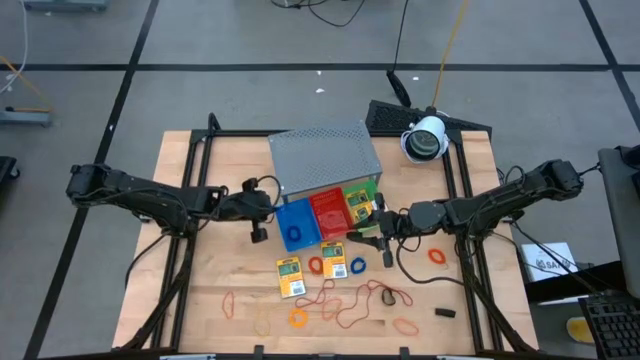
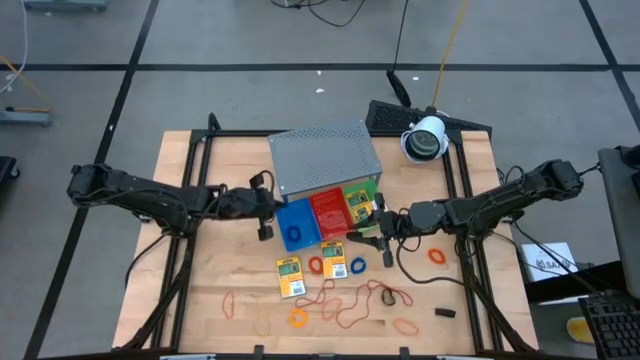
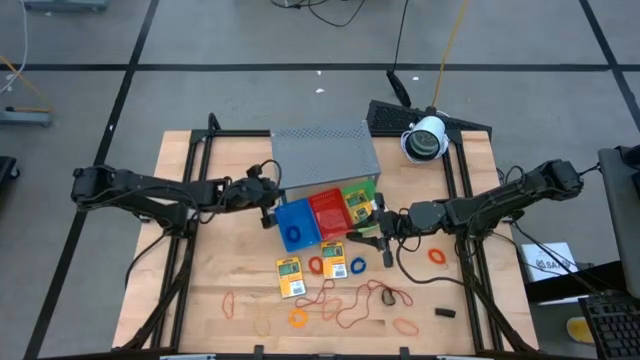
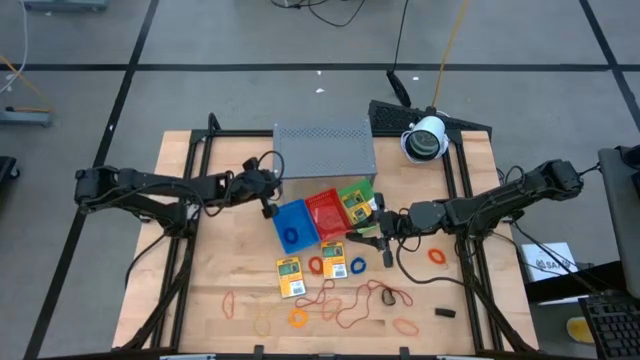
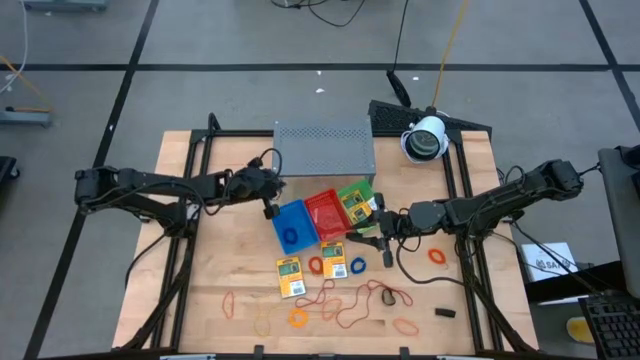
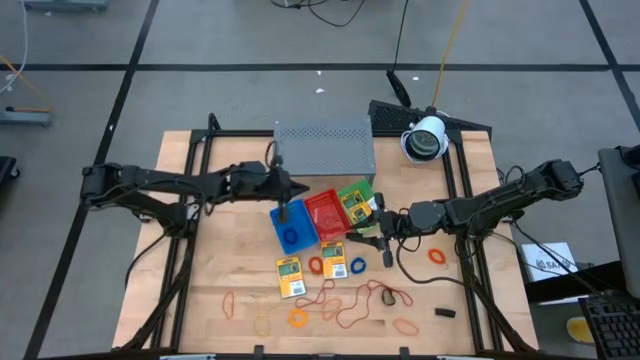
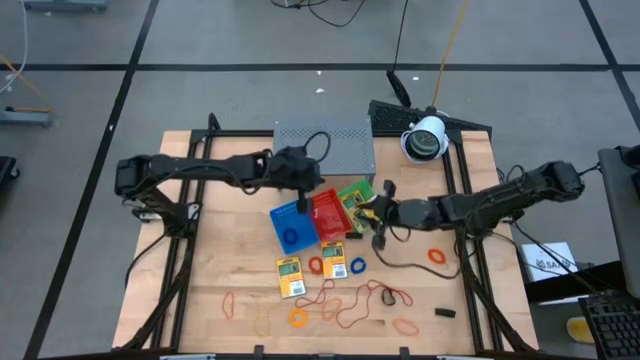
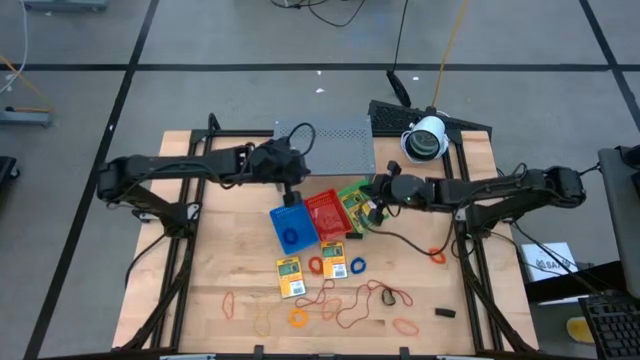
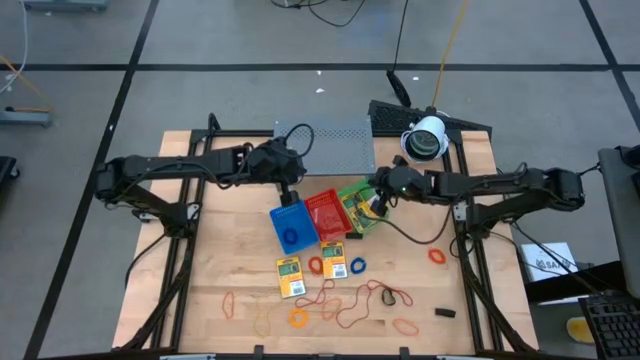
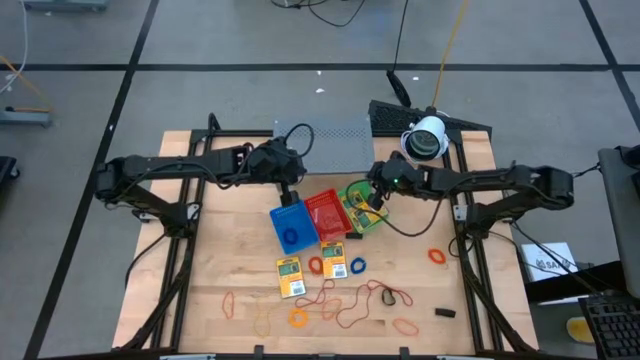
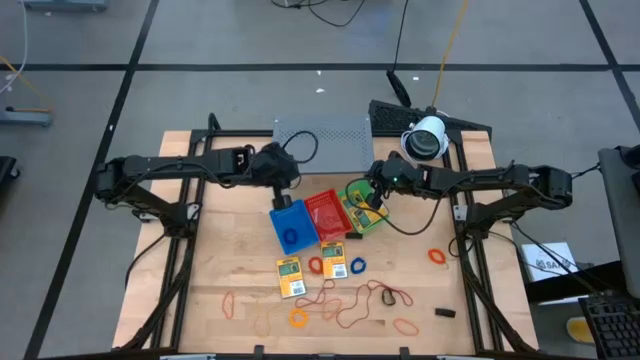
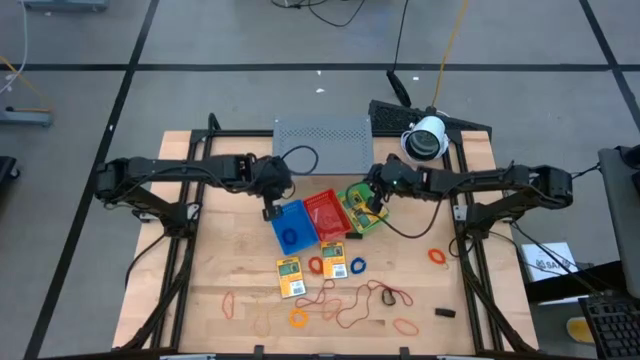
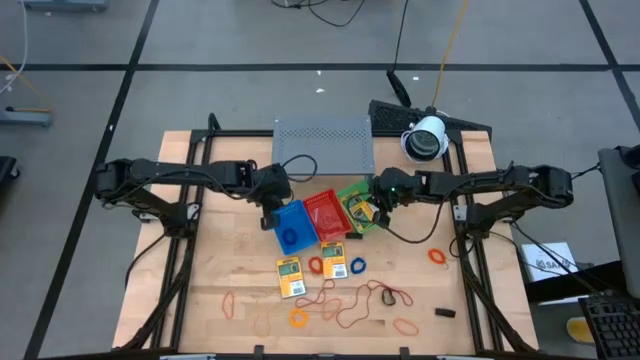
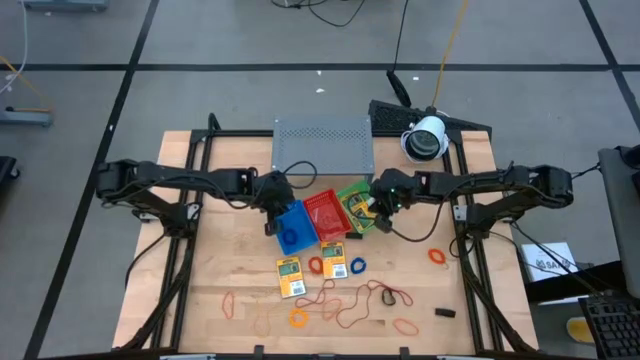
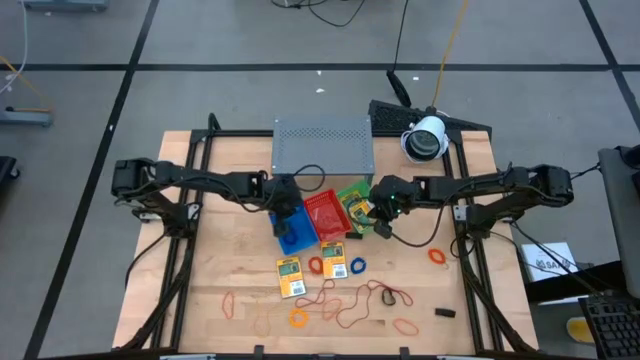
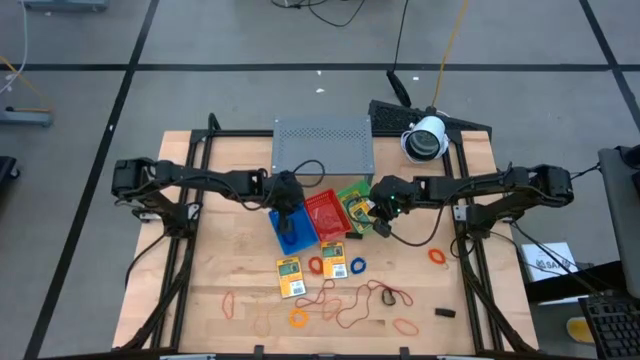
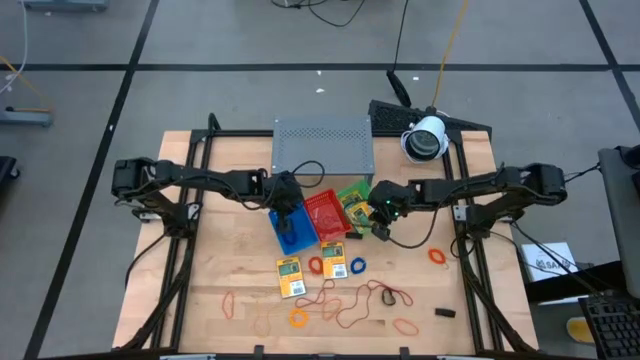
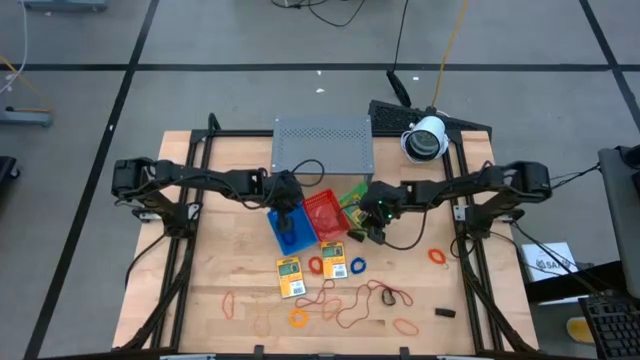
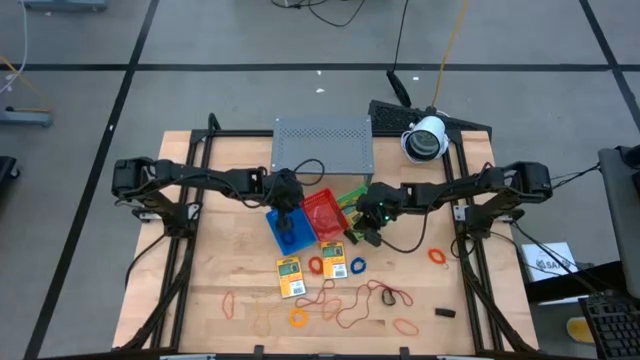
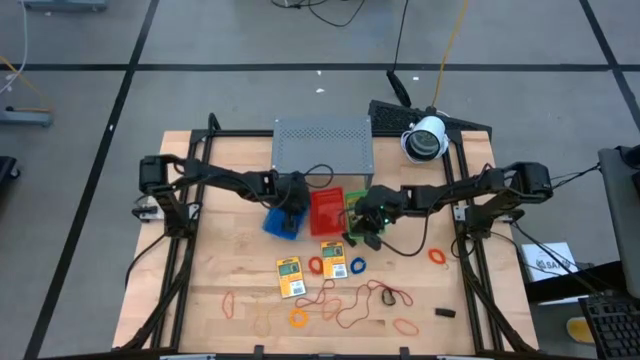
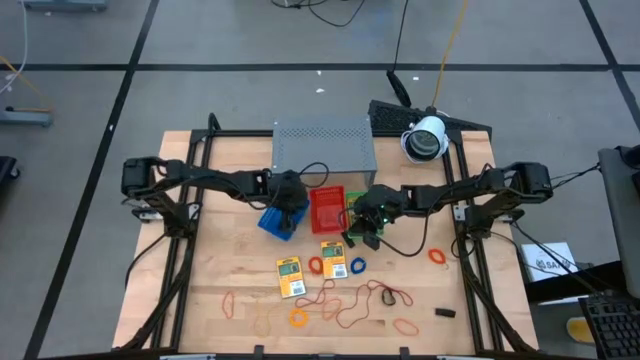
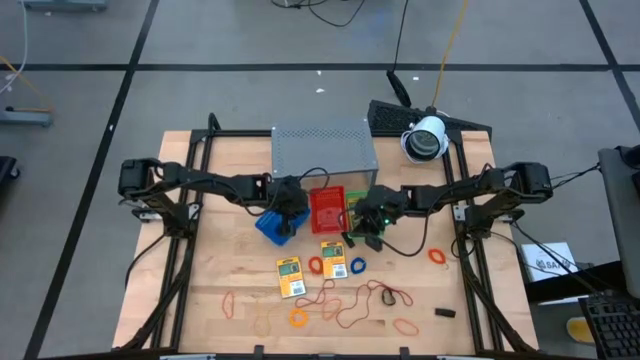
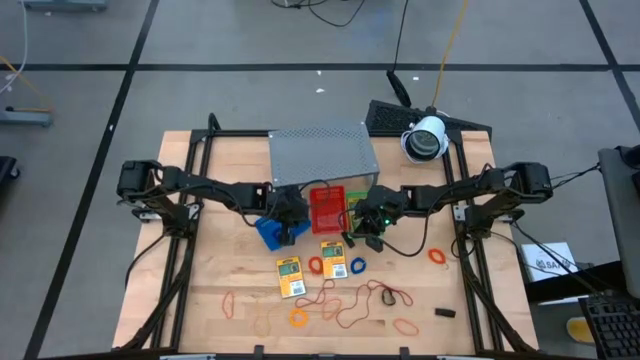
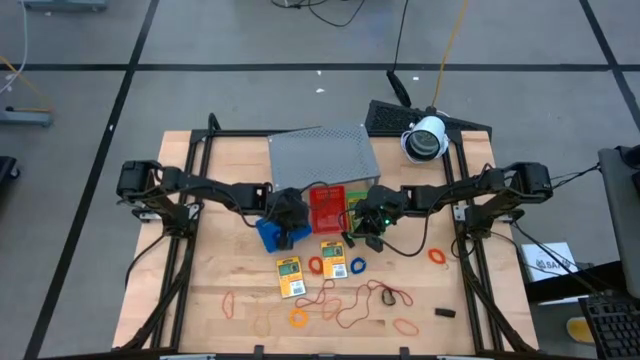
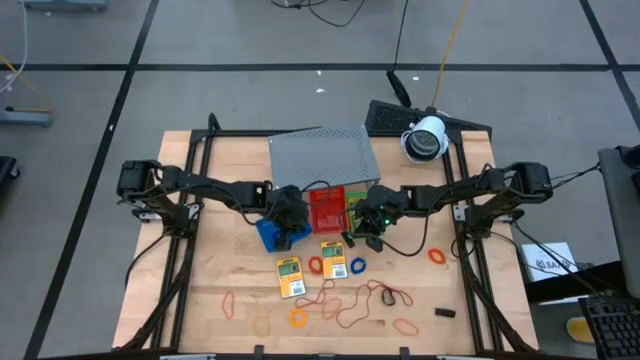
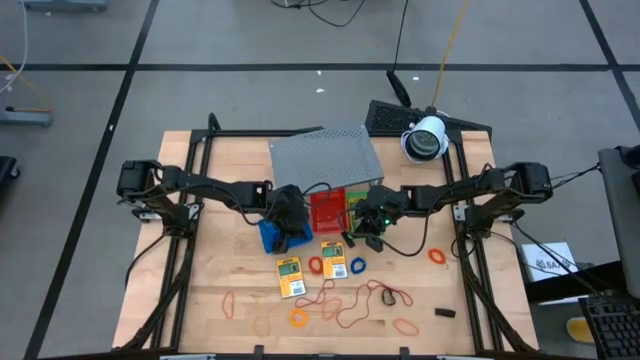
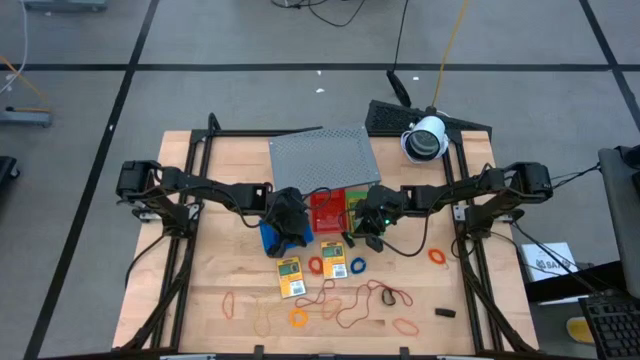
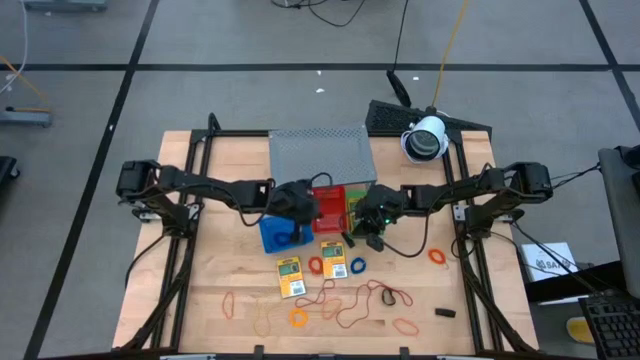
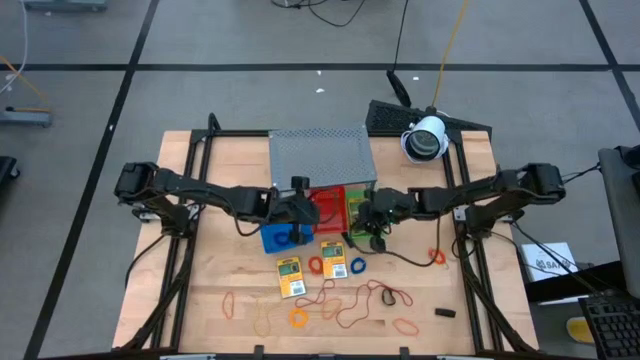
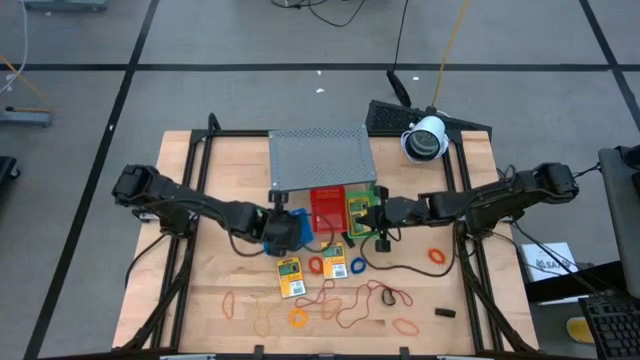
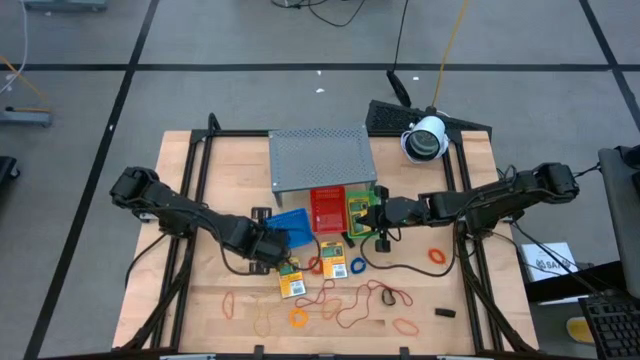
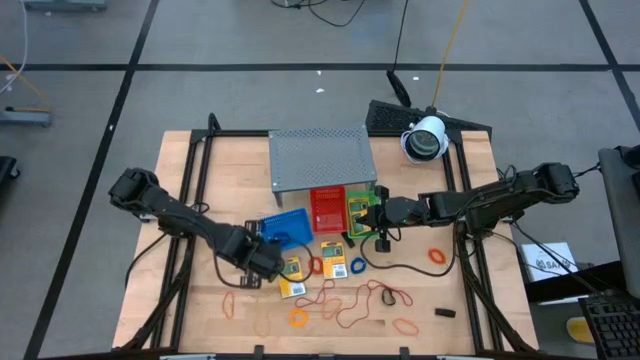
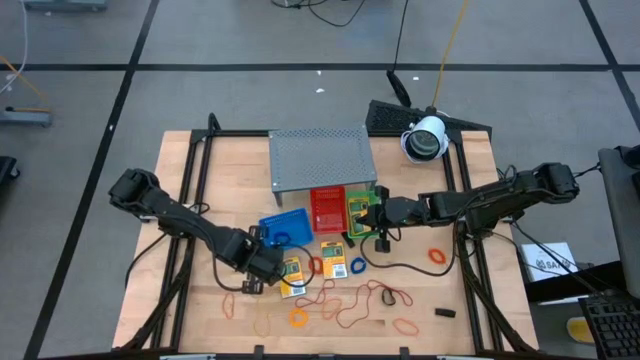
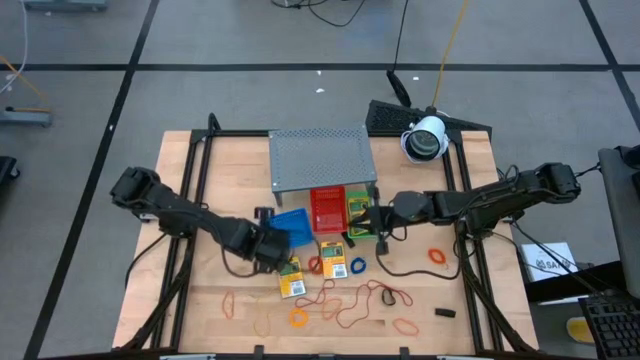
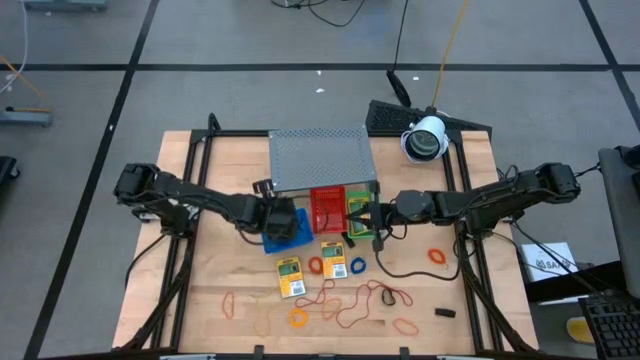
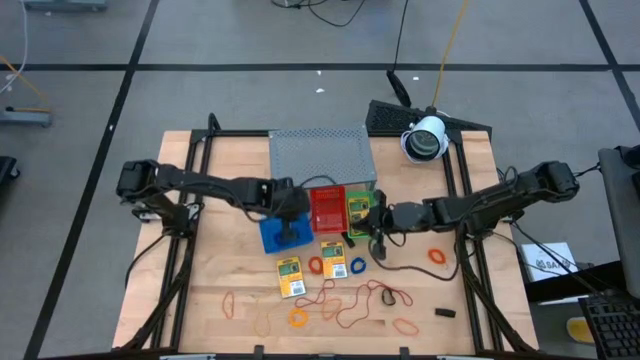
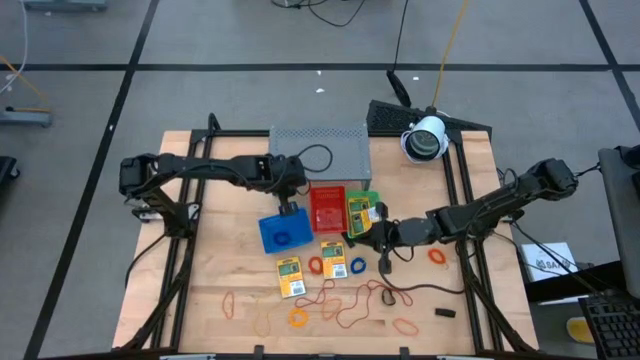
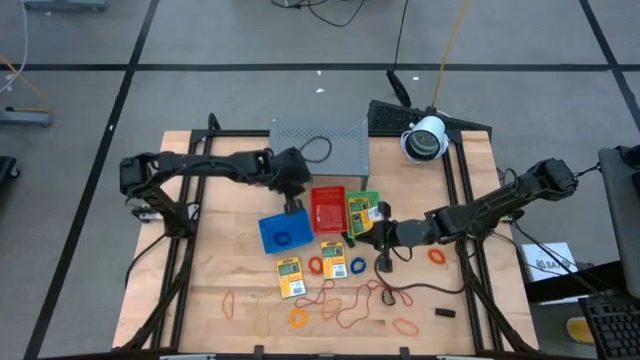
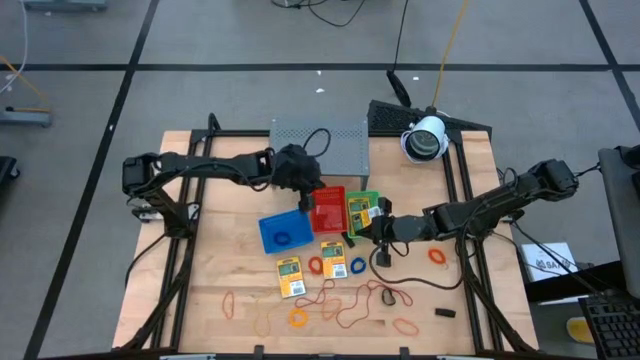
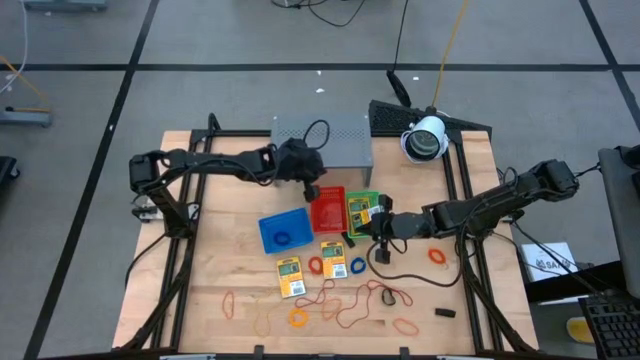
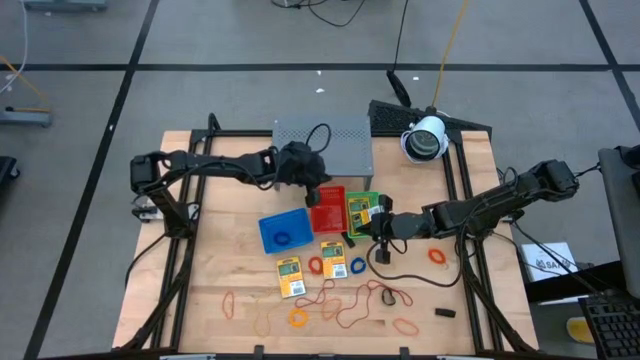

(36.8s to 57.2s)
Task: Pick & Place Office Desk Supplies
Adjust the shelf

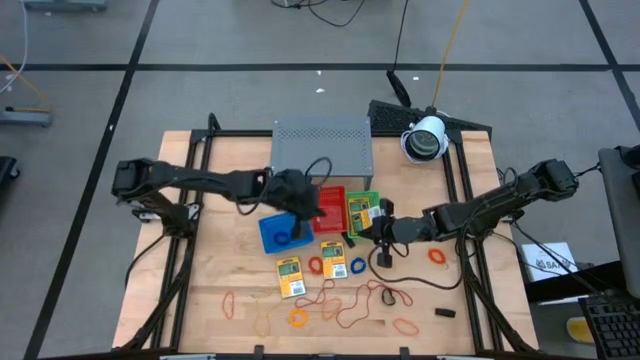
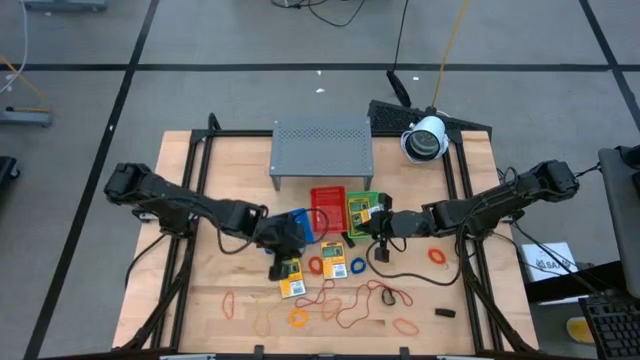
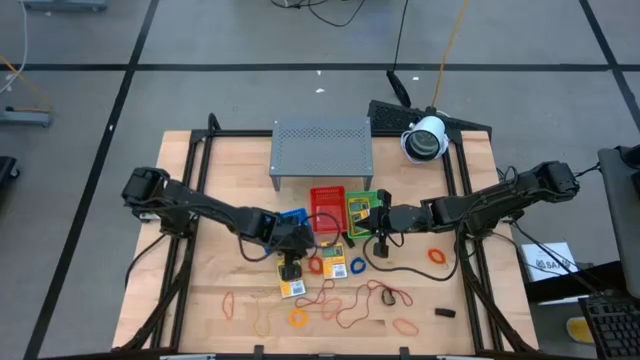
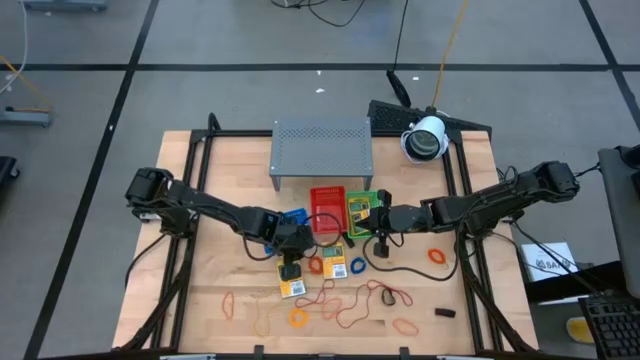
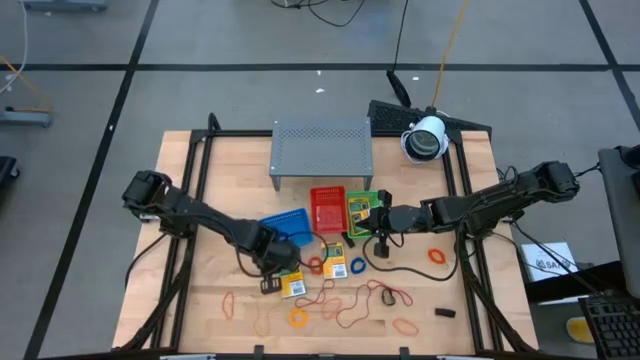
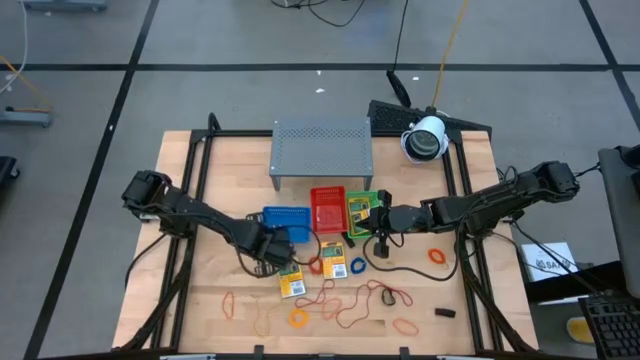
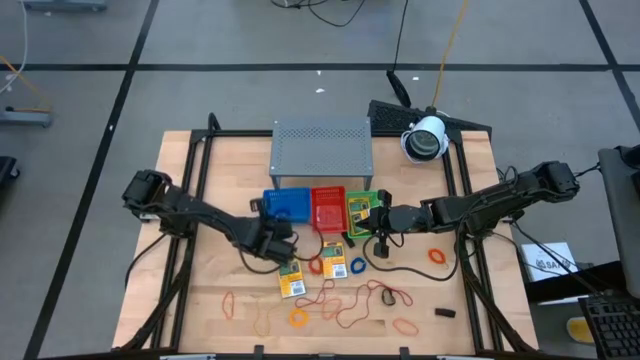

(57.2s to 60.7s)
Adjust the blue bin
